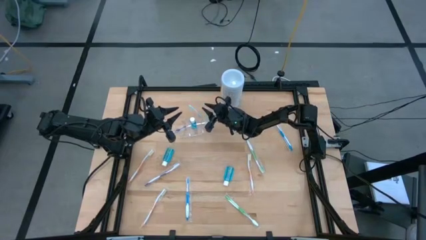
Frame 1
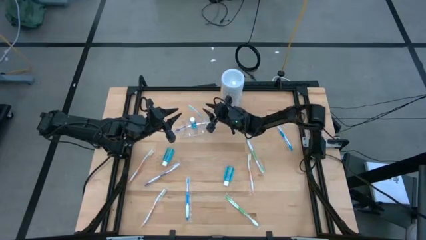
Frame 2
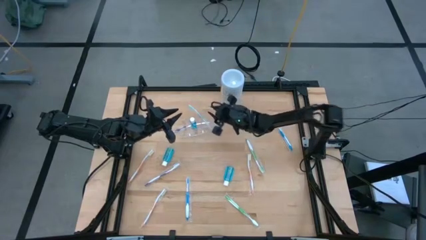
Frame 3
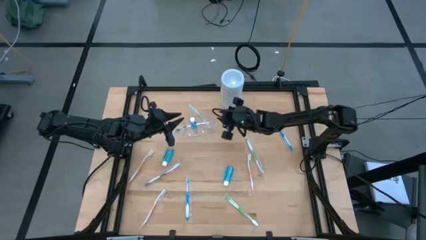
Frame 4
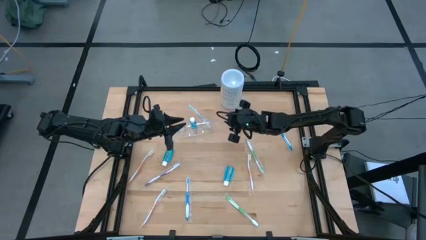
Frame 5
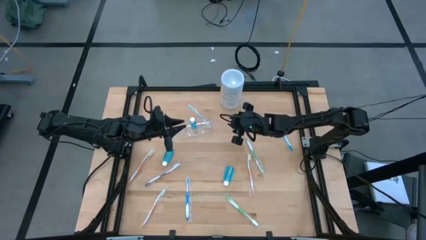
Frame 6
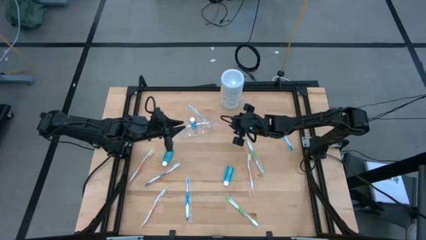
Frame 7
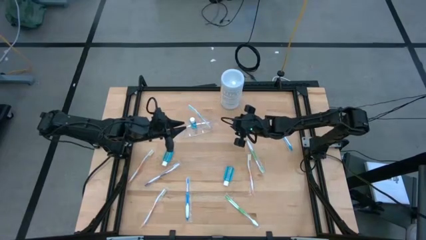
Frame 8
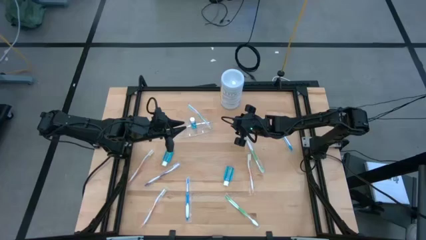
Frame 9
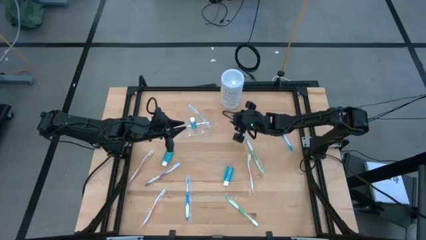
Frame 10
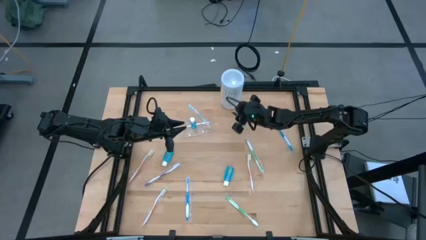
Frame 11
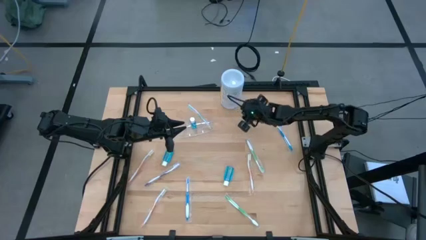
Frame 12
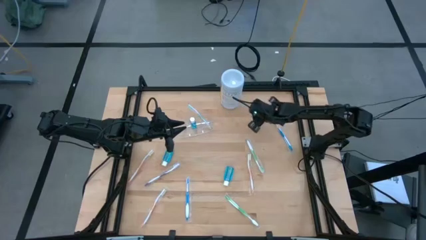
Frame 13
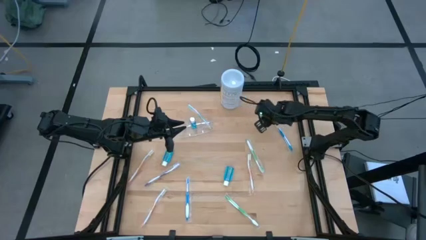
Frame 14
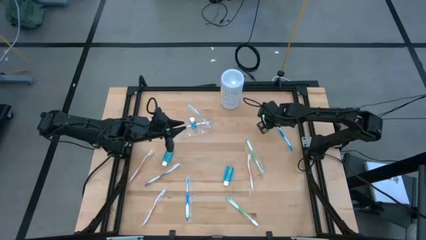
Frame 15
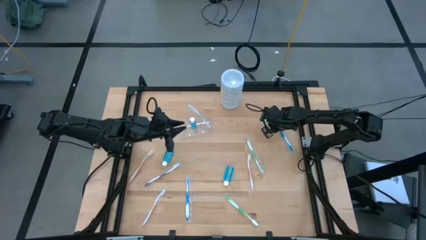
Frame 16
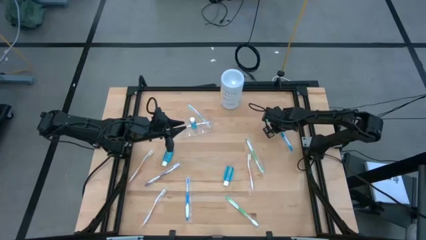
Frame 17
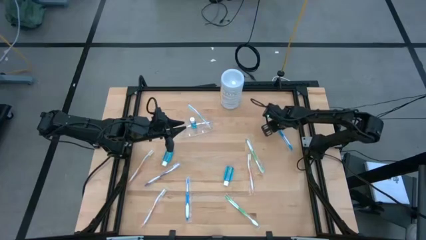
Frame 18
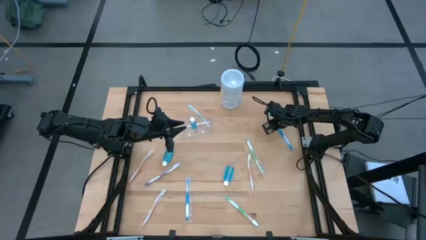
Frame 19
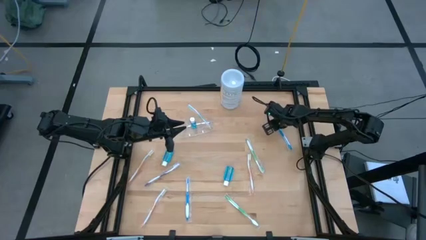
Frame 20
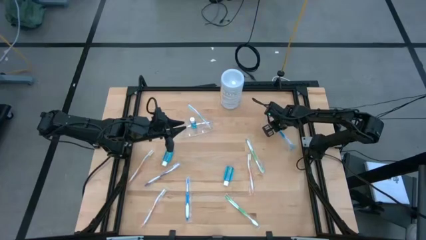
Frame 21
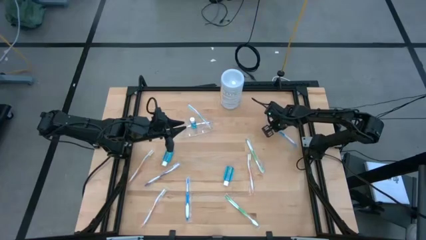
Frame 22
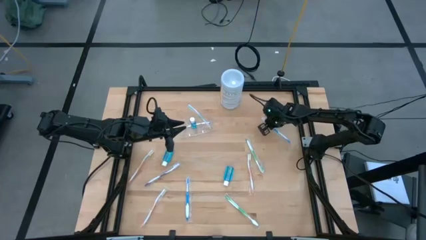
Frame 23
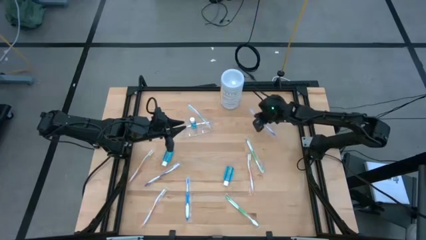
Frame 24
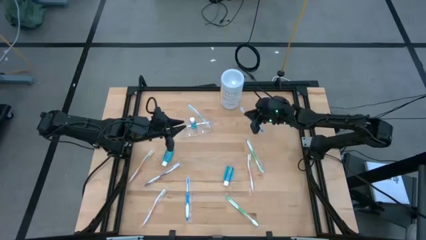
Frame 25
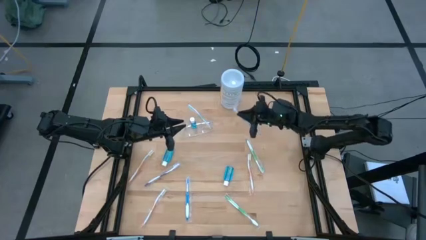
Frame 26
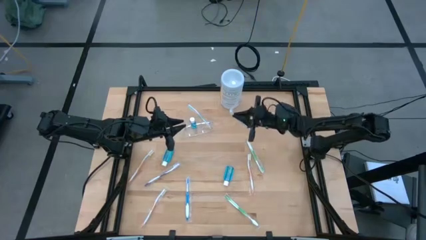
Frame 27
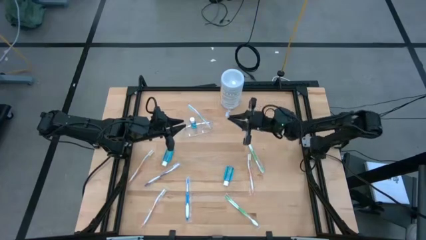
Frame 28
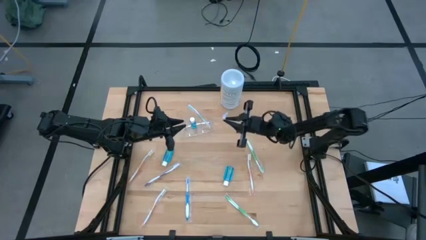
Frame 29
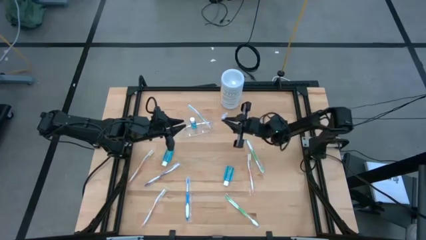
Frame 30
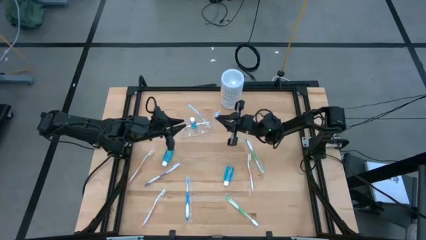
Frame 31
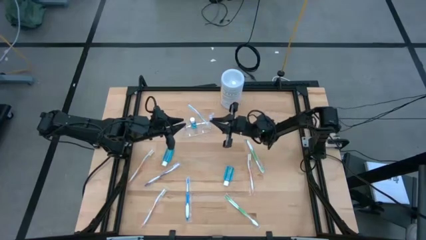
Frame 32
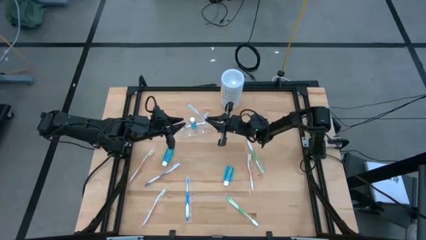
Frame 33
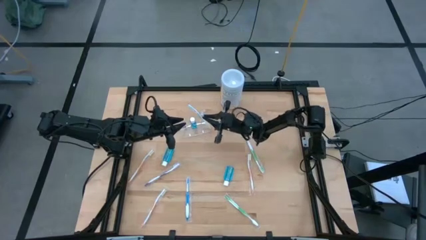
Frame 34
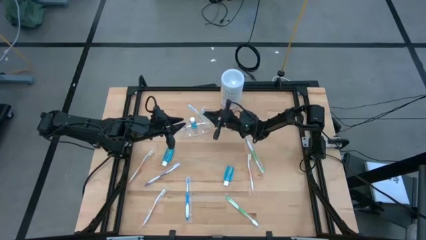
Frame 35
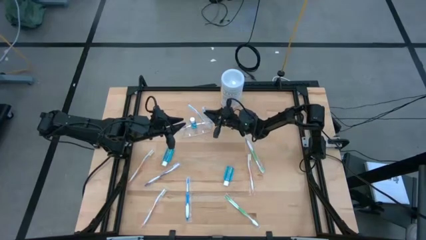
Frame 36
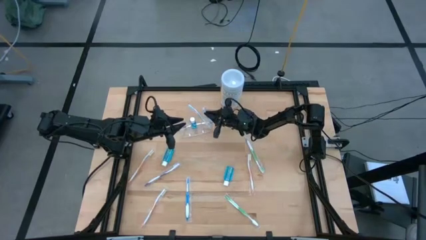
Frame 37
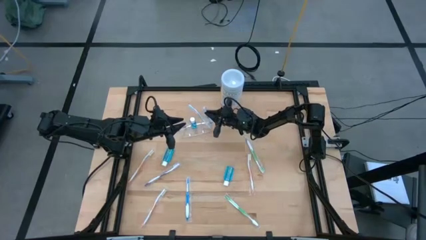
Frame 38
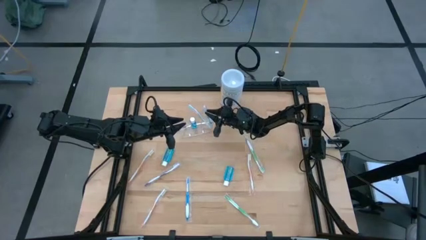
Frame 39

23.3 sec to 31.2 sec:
Task: Pick & Place toothbrushing station
Put the top blue toothbrush into the transparent organizer

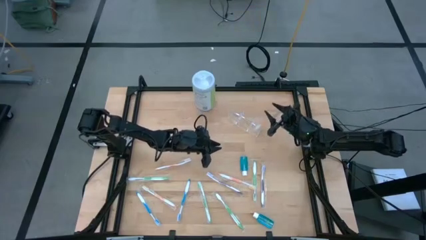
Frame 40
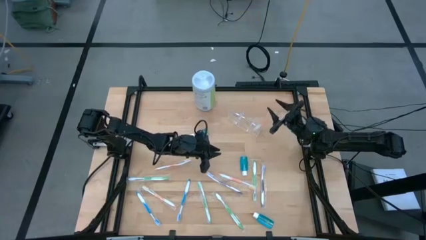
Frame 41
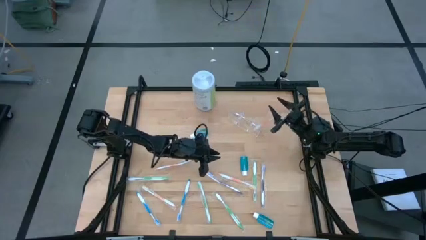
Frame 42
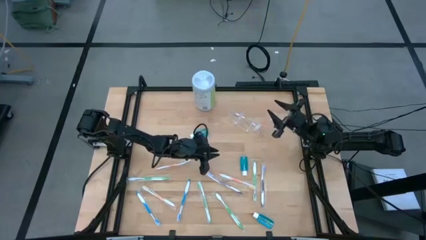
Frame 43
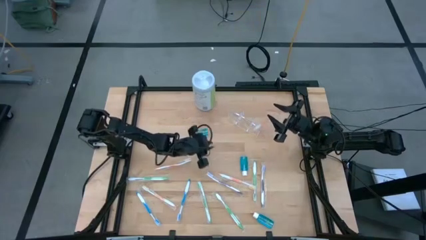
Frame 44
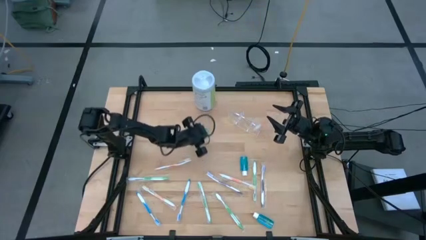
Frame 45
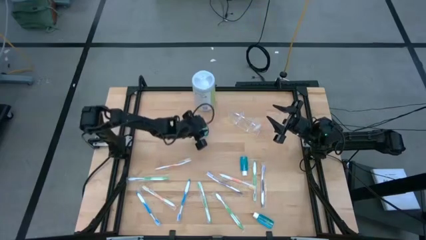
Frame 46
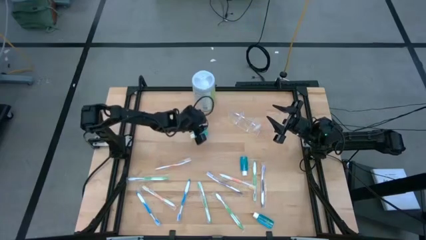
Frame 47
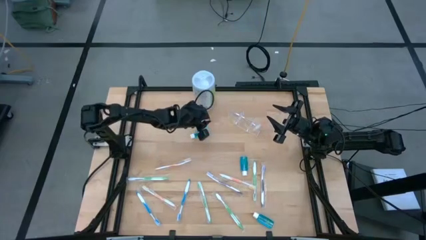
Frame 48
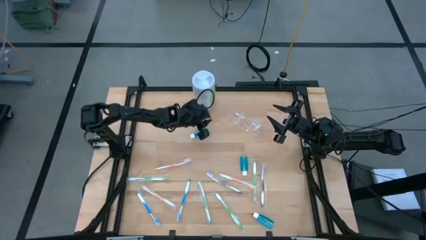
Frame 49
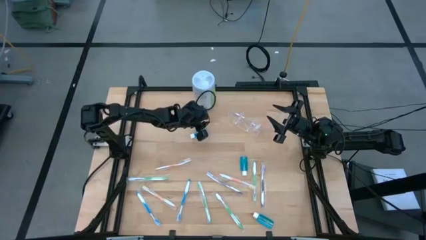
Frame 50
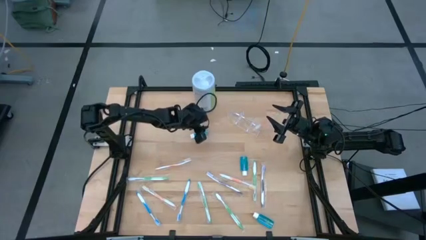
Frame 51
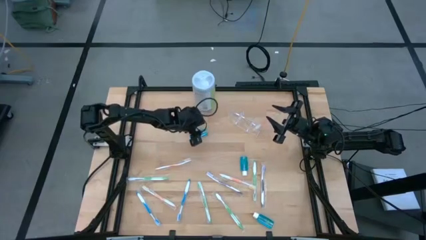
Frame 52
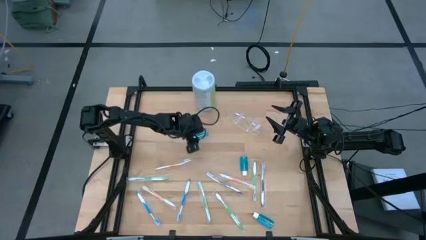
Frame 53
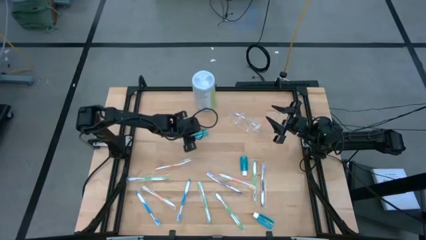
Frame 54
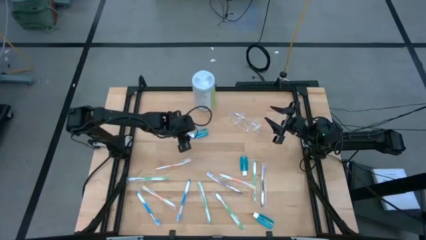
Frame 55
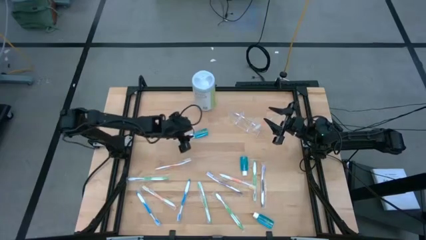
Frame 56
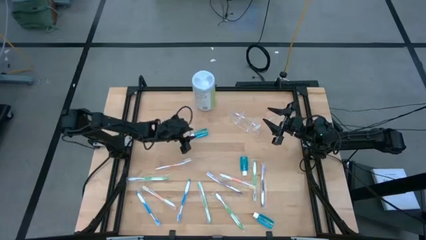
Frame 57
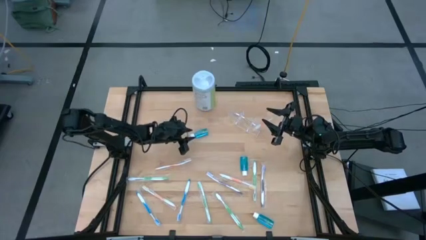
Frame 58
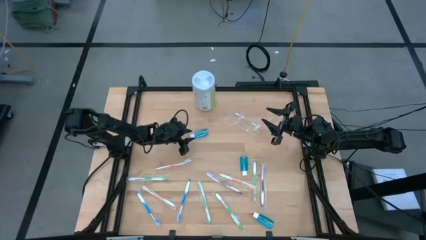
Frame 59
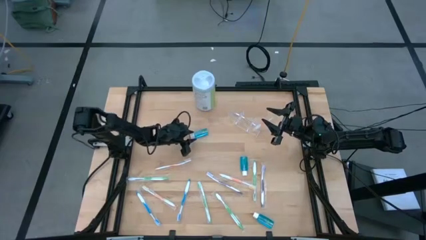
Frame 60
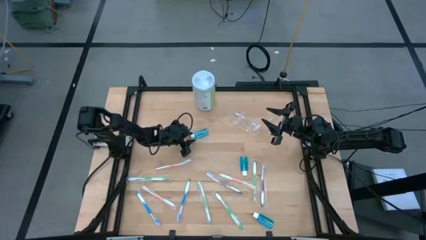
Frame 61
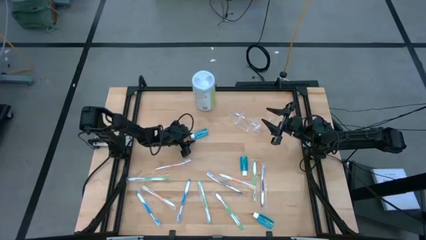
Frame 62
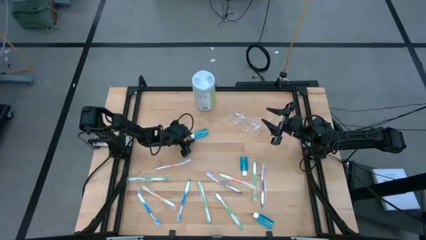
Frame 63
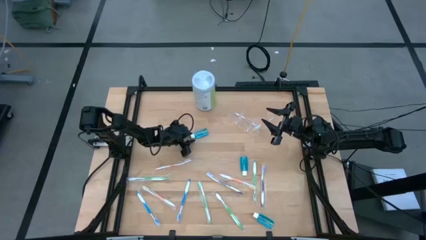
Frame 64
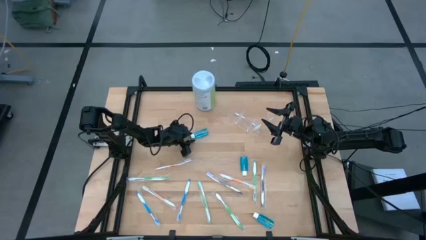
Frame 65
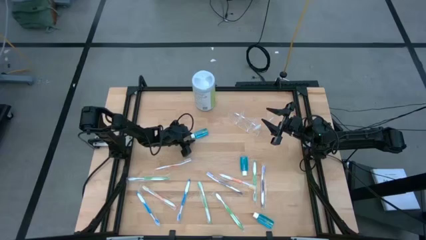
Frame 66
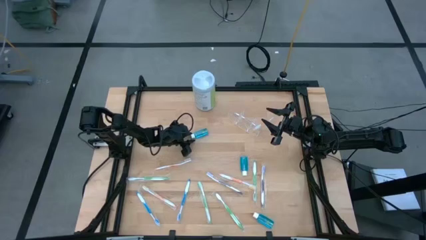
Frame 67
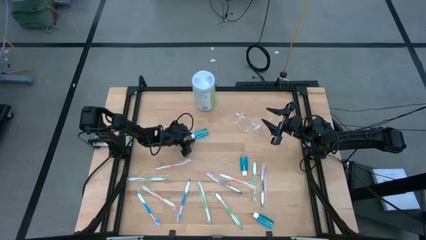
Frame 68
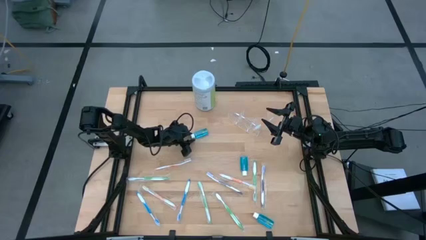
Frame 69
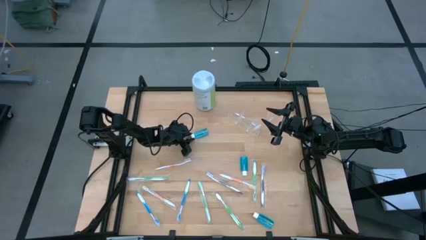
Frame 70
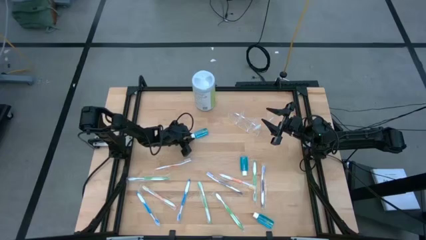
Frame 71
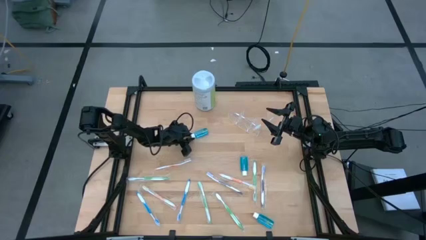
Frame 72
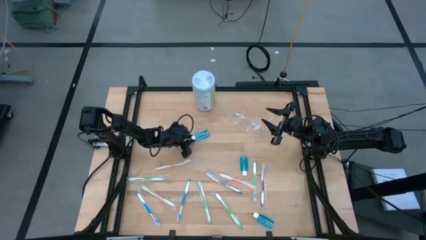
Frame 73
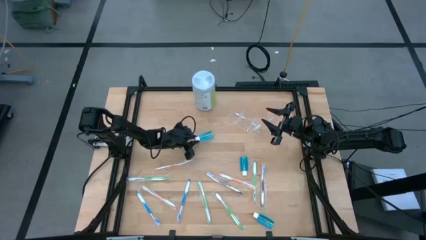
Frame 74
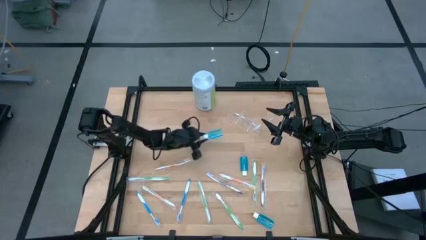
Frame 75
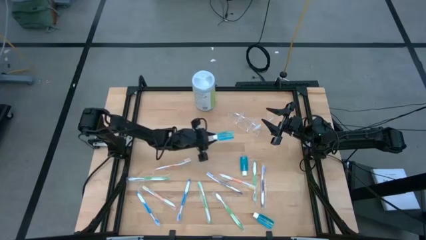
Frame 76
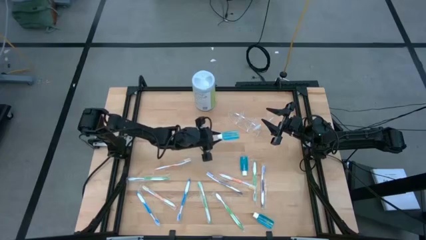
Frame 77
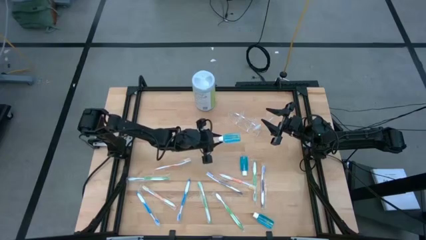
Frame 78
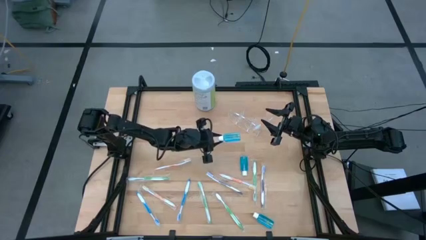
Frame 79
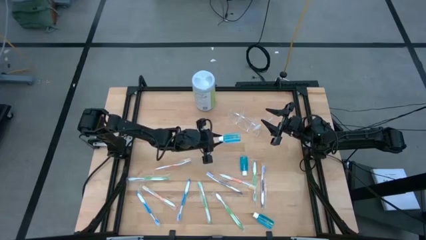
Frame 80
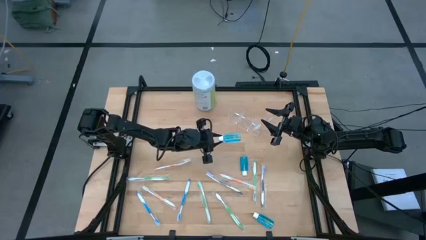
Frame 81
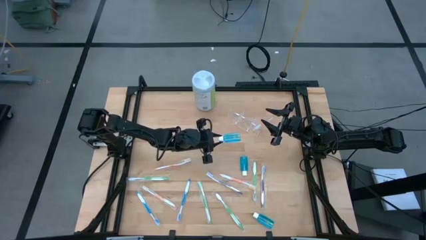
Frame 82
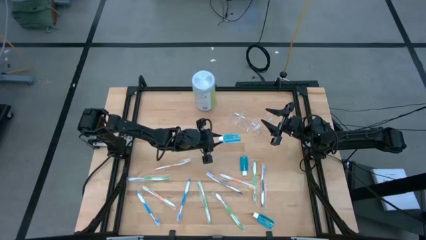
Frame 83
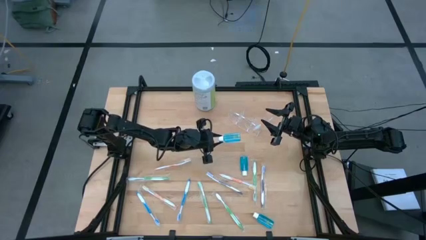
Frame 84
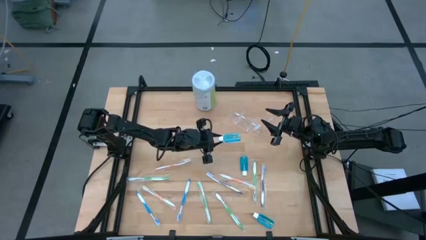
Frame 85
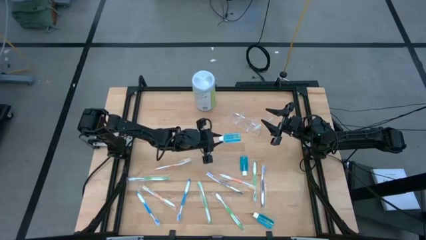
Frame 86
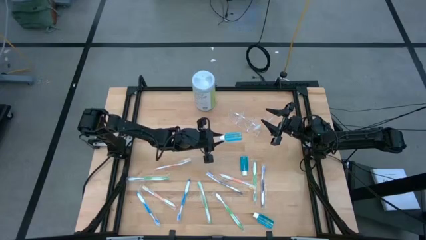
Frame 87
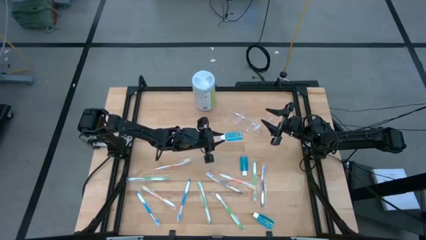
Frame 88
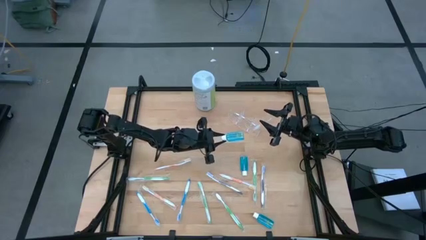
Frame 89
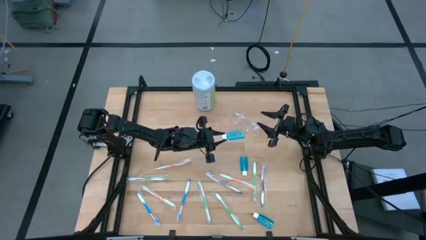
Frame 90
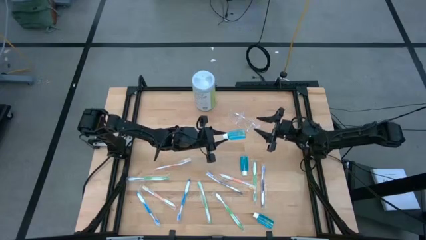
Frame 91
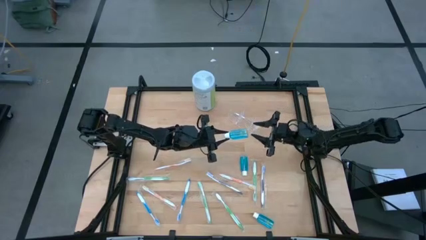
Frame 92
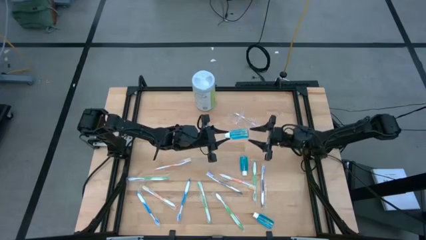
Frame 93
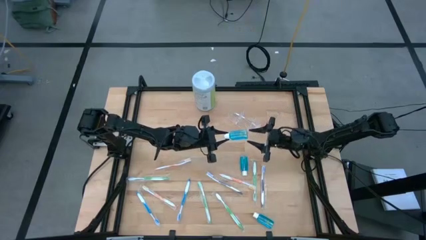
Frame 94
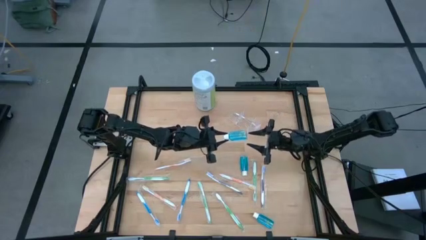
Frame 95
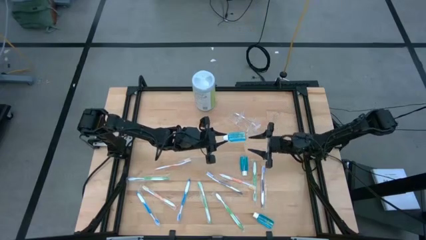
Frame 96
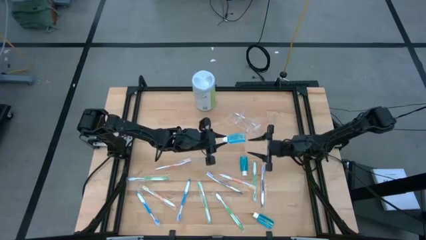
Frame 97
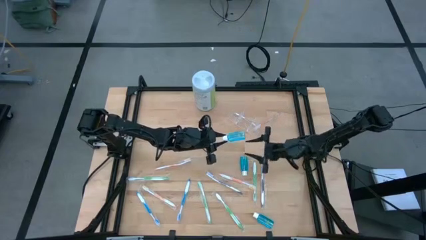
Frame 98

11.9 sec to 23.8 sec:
Task: Pick & Place toothbrushing station
Put the blue mouthwash into the transparent organizer
